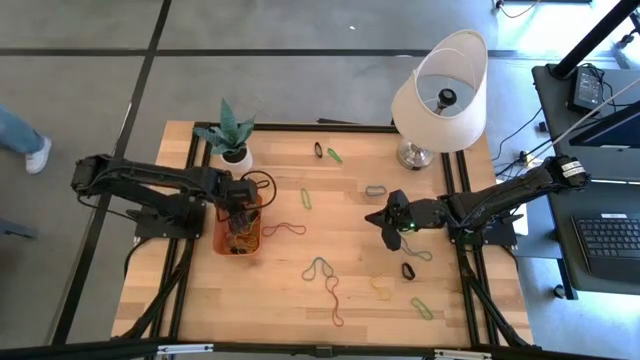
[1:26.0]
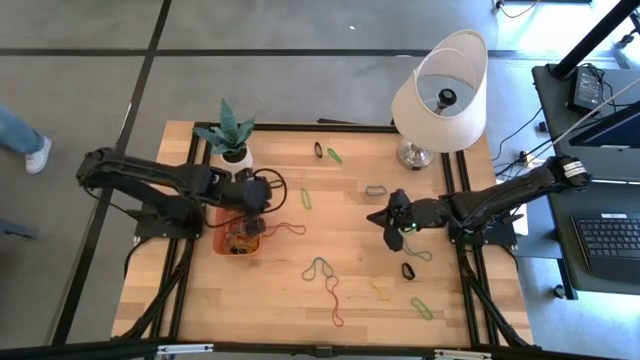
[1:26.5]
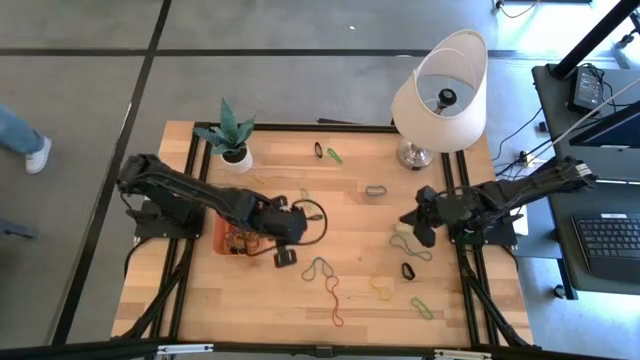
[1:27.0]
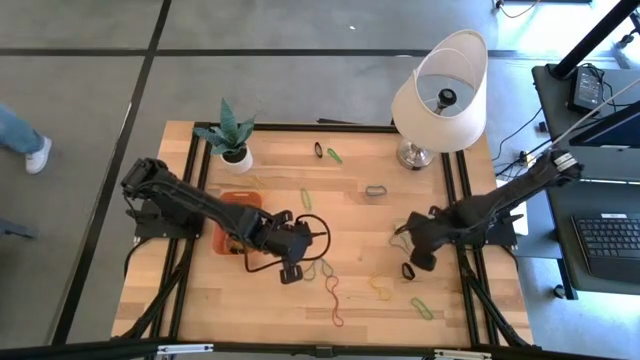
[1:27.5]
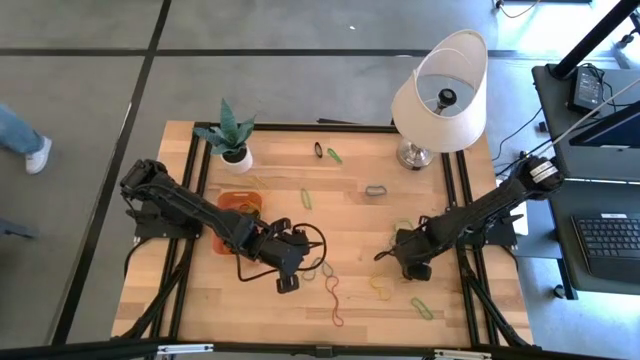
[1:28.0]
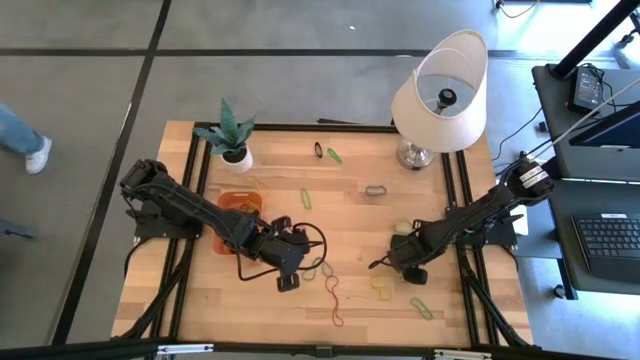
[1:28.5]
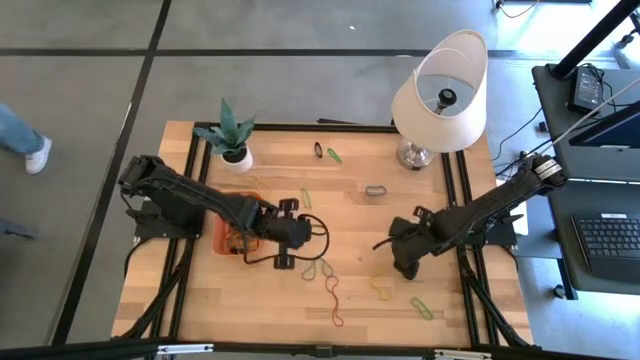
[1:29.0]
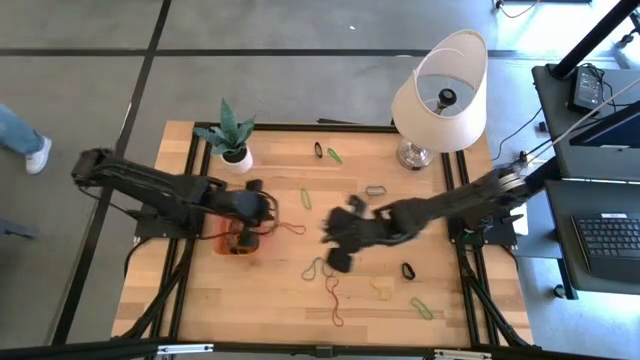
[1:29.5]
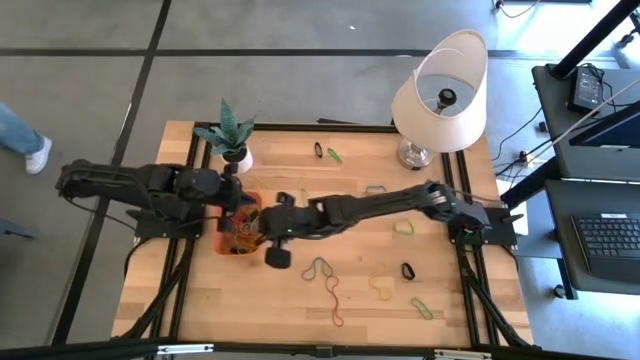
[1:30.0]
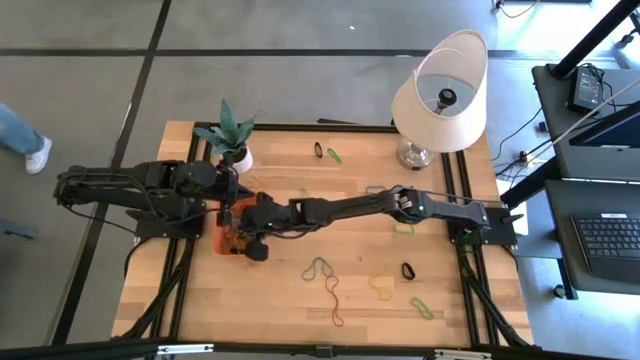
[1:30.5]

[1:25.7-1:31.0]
Task: Pick and place rubber bands into bin
Put the blue rubber band into the orange bin

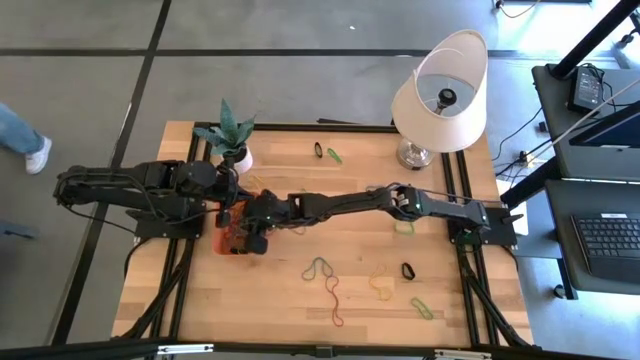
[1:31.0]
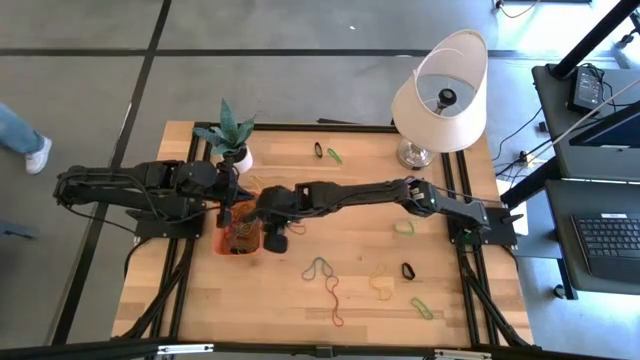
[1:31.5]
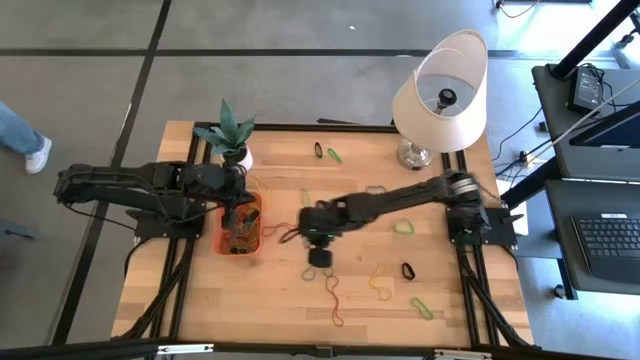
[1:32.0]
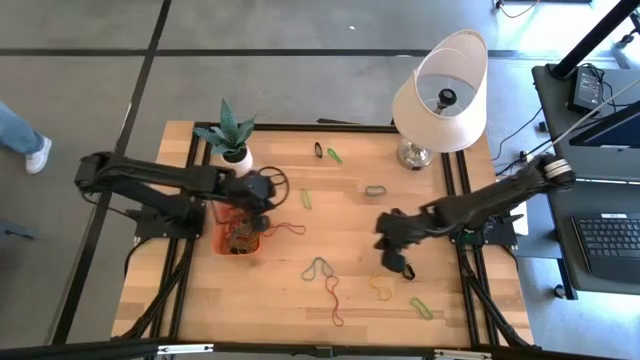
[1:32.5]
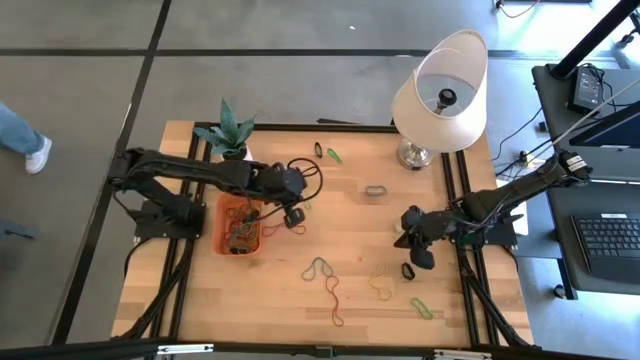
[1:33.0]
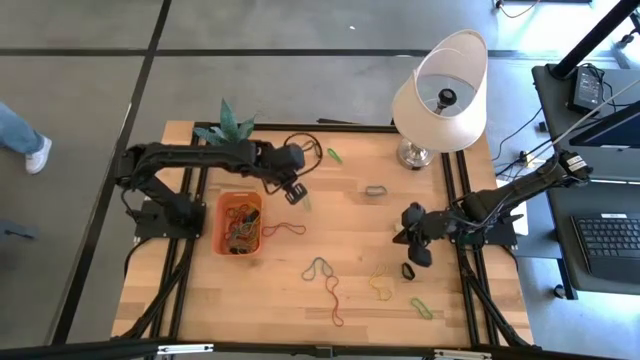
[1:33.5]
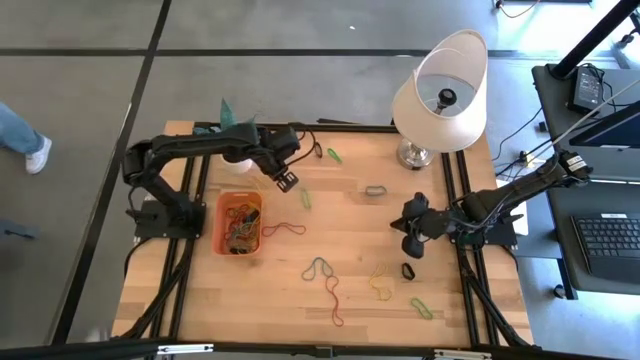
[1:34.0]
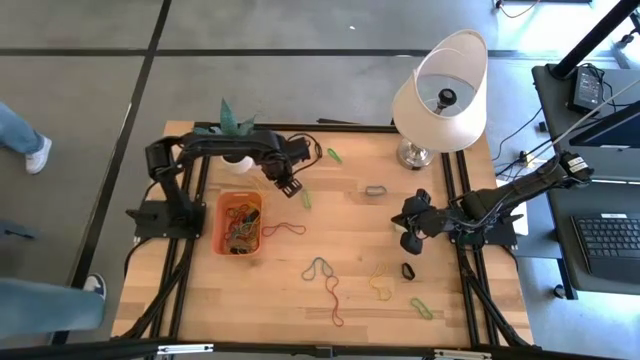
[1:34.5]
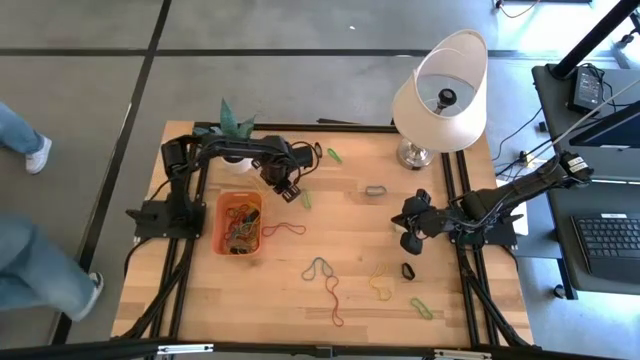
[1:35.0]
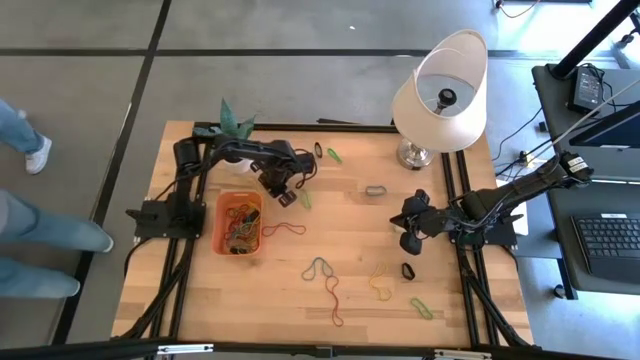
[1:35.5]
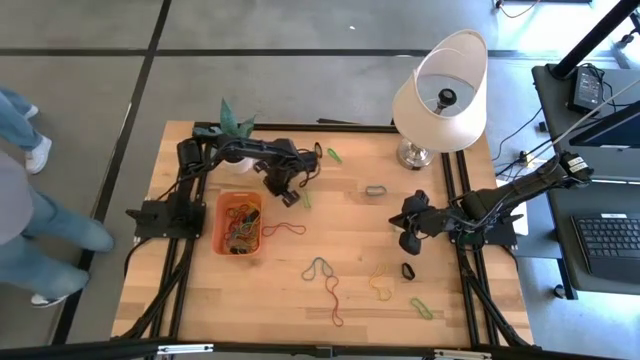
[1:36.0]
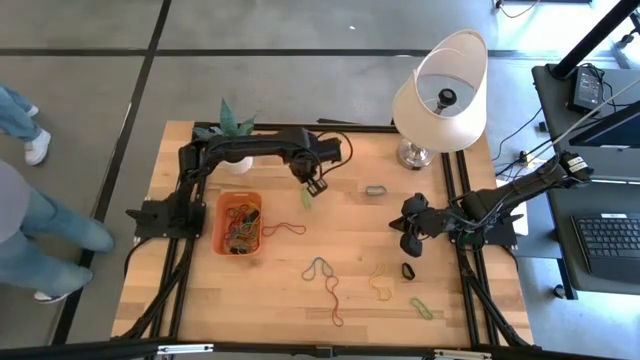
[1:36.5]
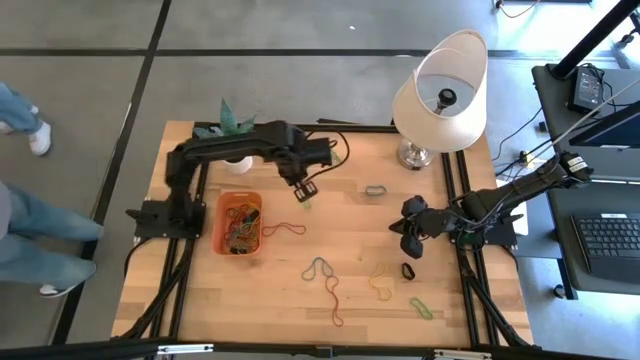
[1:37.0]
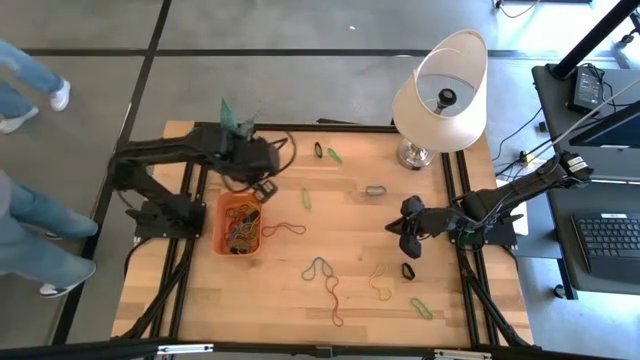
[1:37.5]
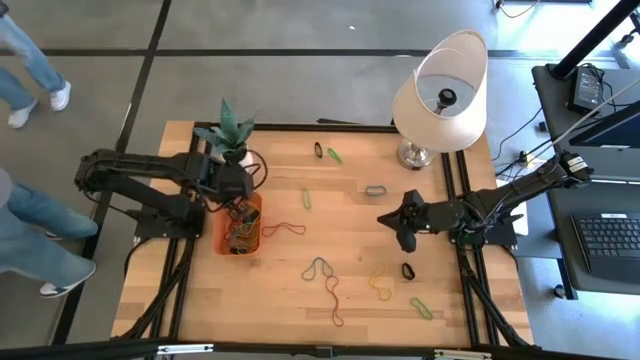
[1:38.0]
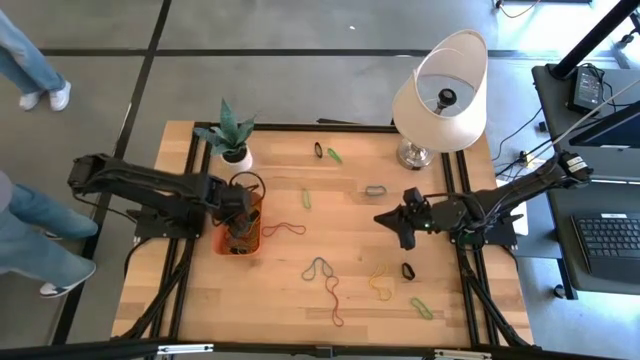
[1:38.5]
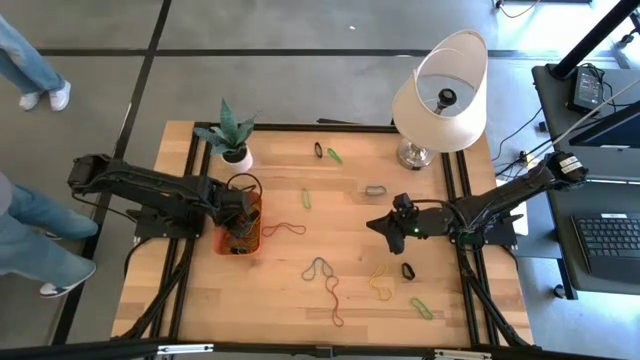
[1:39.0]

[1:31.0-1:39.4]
Put the yellow rubber band into the orange bin

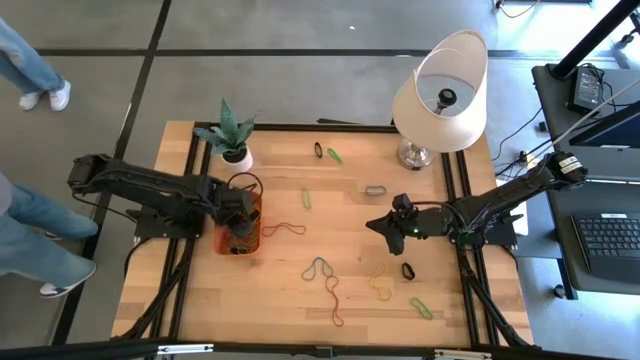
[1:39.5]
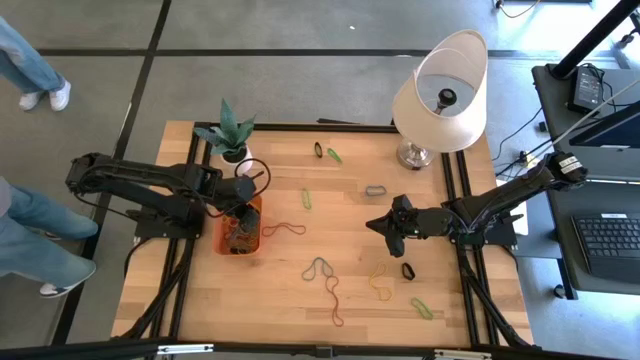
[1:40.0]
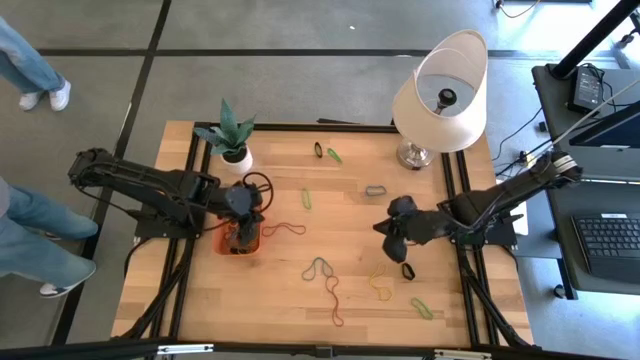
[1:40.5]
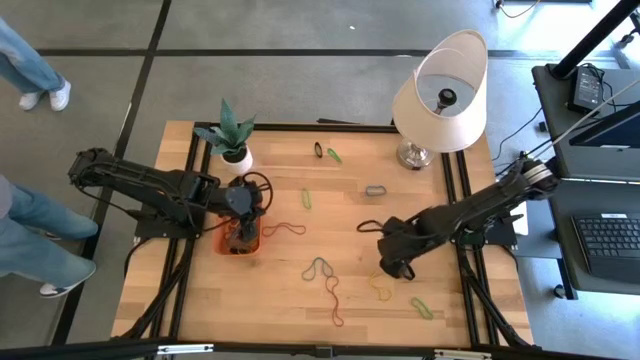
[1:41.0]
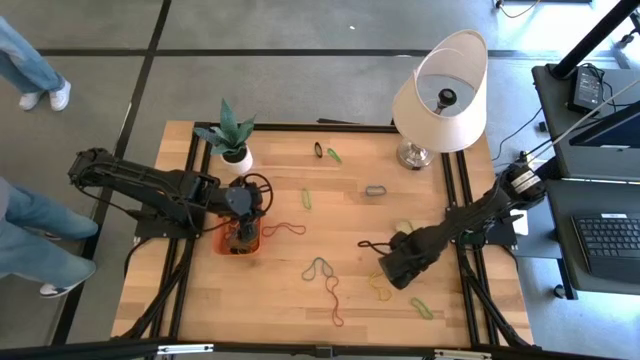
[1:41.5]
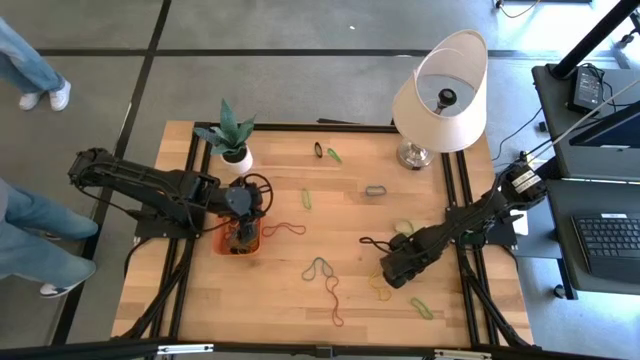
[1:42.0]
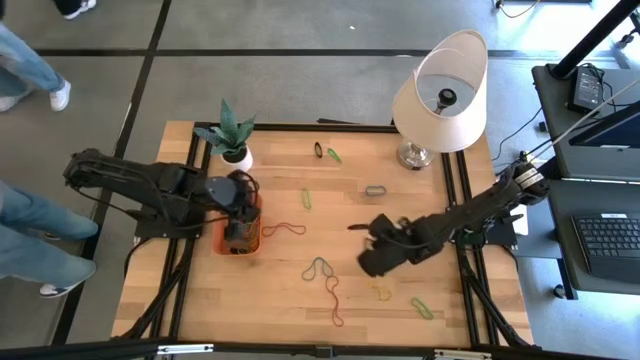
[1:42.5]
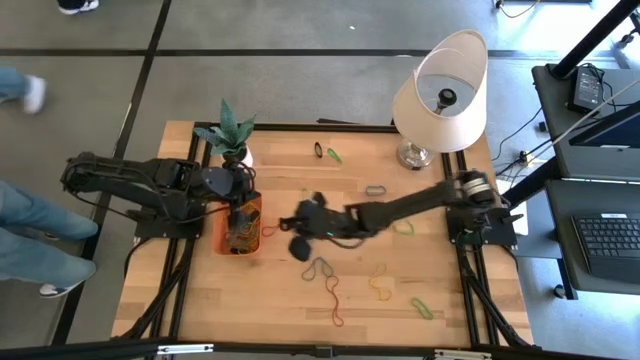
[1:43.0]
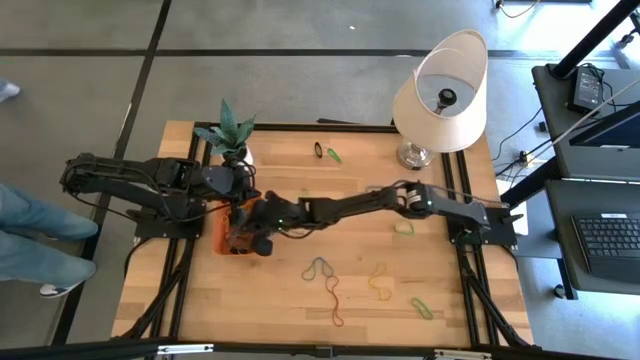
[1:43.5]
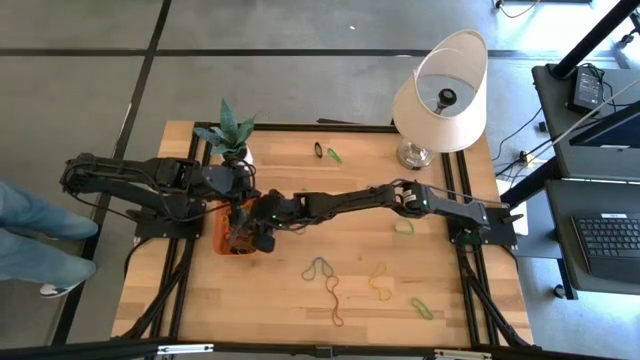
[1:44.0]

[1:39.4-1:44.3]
Put the black rubber band into the orange bin

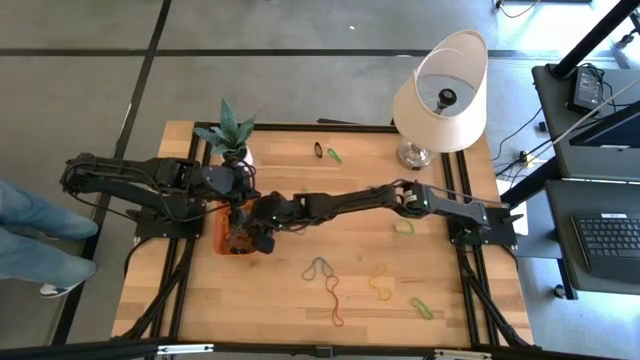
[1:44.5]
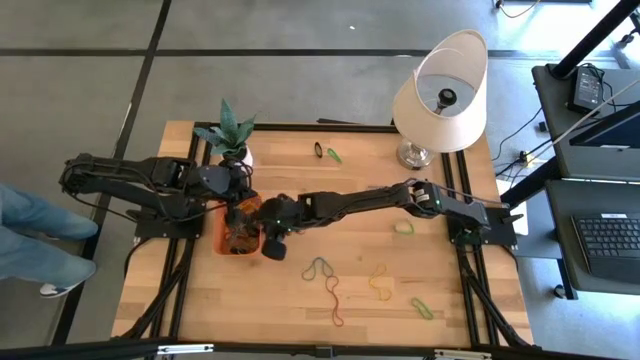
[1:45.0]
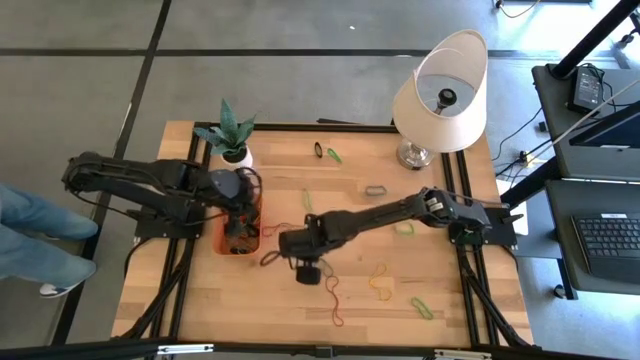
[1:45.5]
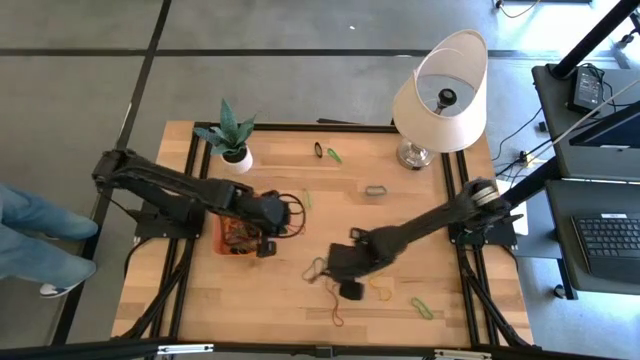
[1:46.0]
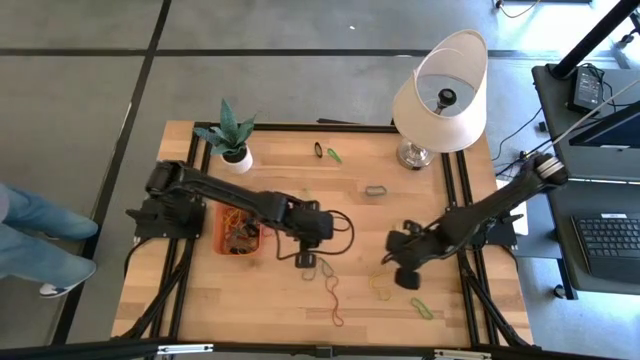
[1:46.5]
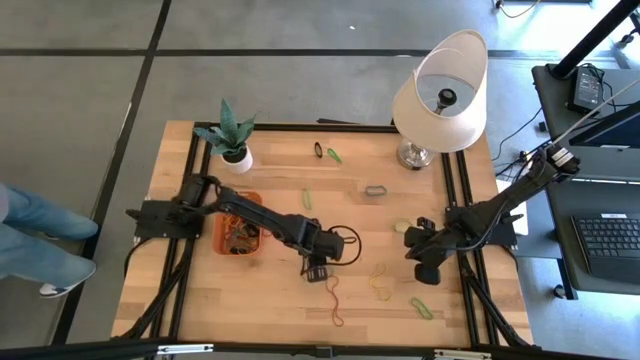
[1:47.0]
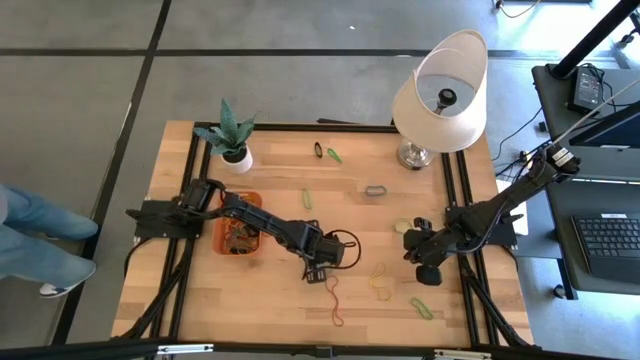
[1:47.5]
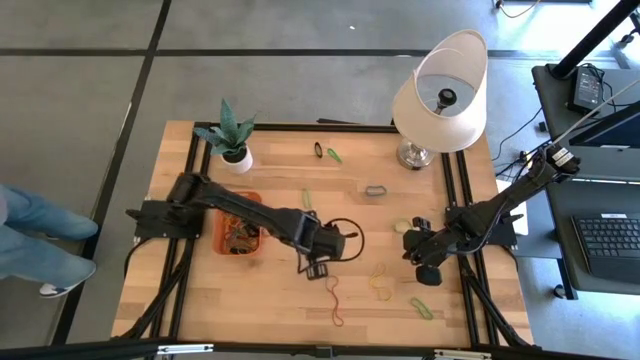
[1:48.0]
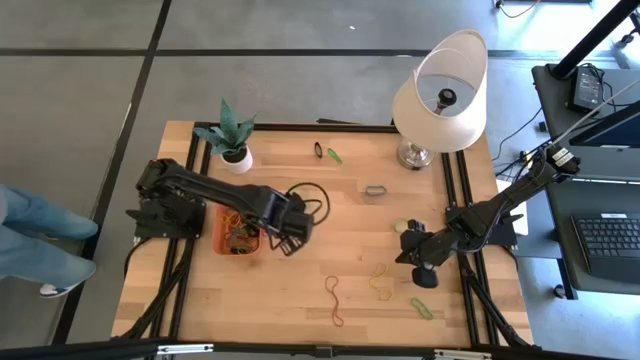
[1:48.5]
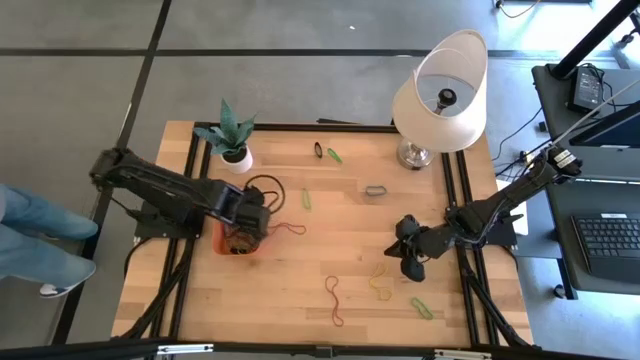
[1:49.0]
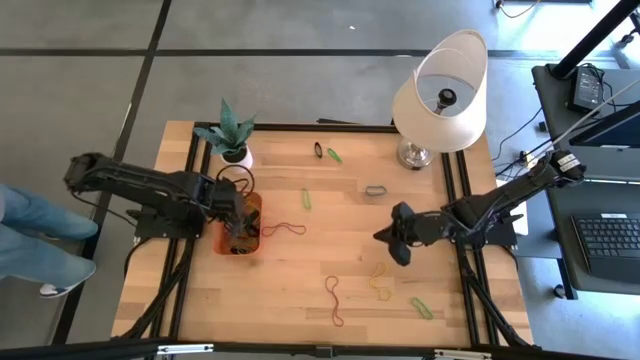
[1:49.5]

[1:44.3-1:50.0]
Put the blue rubber band into the orange bin
